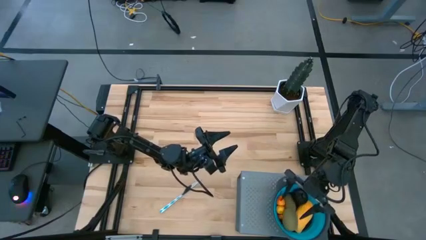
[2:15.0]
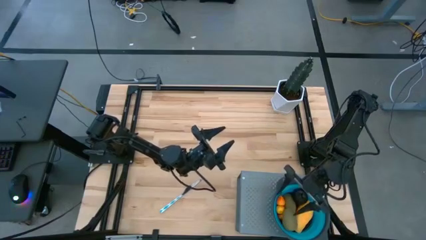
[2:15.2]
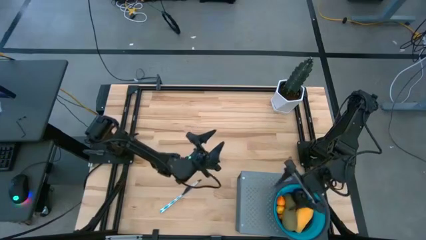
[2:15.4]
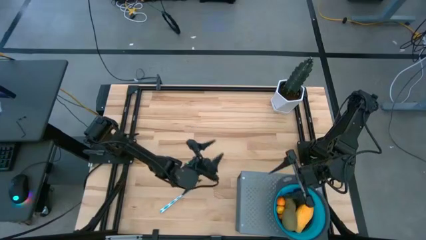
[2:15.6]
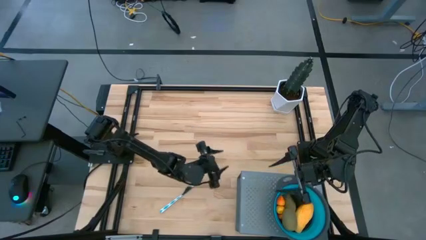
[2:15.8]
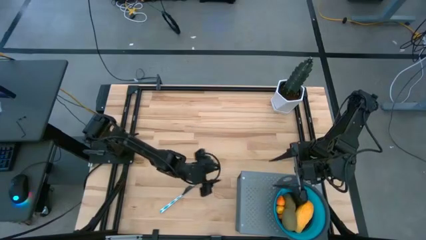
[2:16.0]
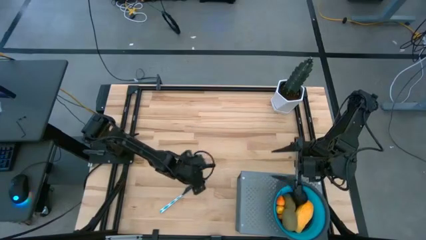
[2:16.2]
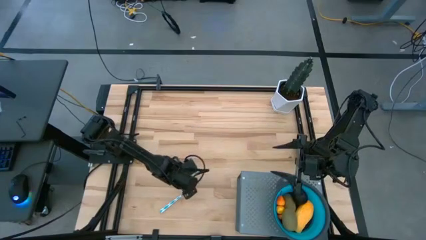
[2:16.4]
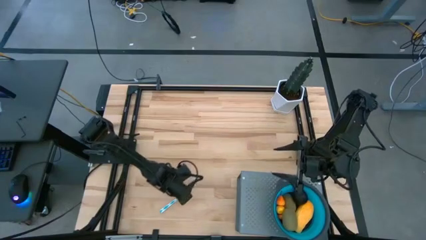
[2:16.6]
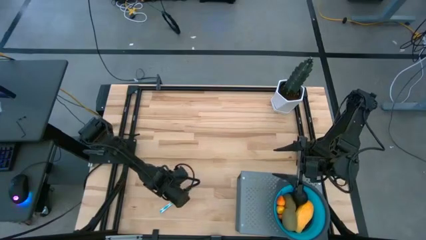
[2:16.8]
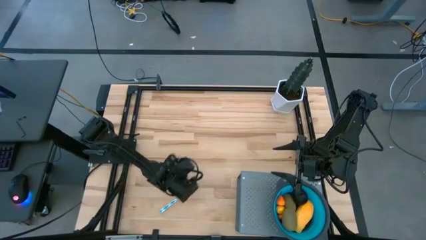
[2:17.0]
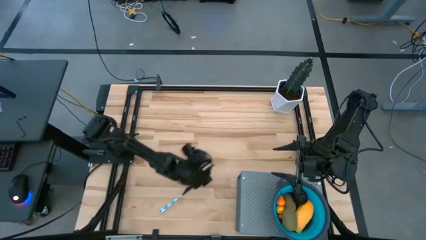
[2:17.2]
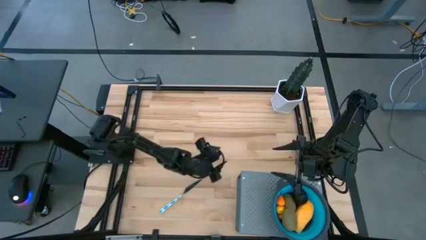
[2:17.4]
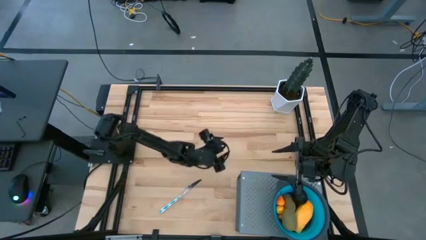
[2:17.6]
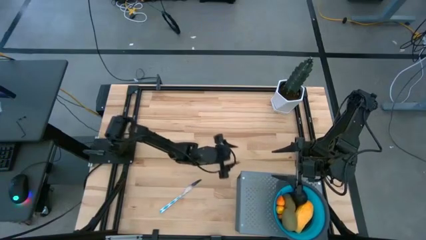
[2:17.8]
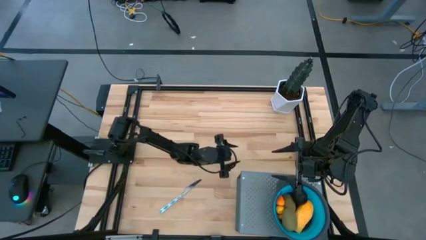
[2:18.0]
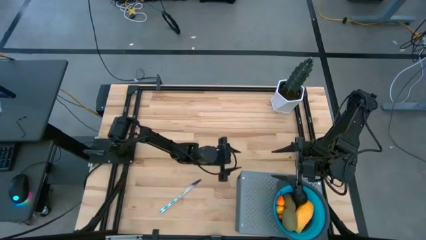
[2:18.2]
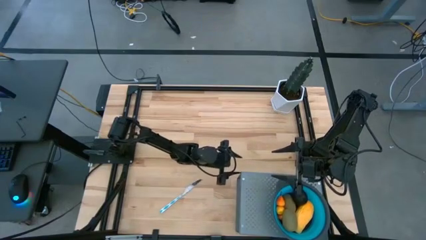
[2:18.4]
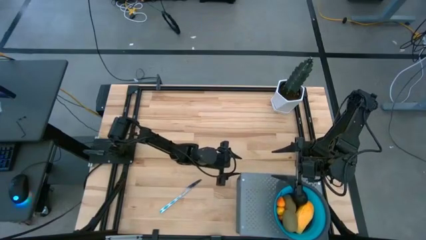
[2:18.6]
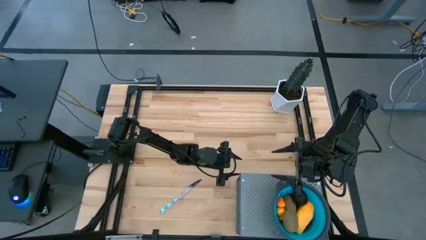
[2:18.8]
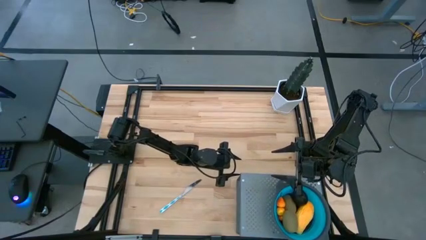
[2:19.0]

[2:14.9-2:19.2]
Task: Pick & Place Fruit
Adjust the shelf on the table

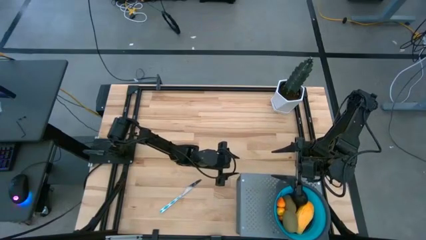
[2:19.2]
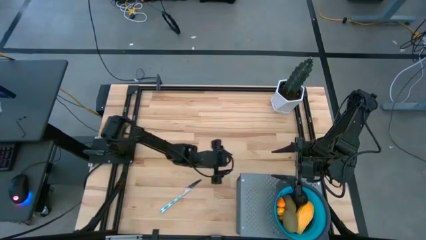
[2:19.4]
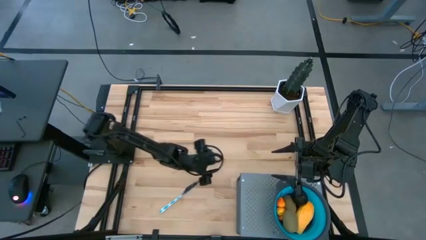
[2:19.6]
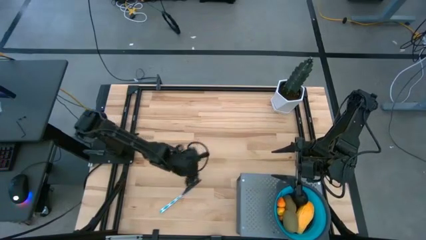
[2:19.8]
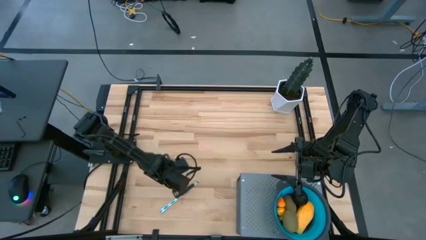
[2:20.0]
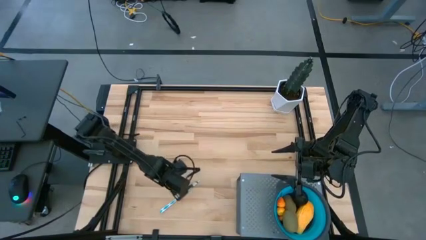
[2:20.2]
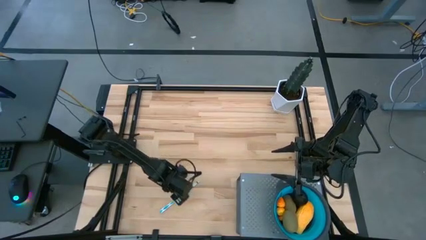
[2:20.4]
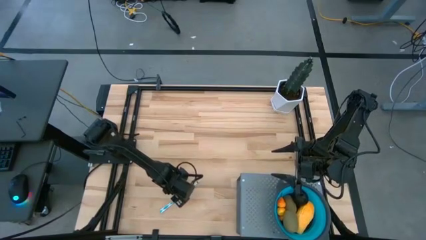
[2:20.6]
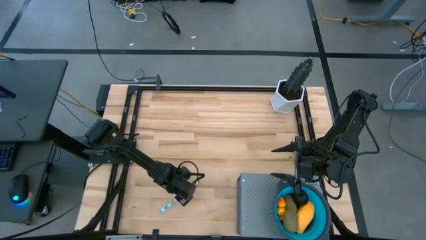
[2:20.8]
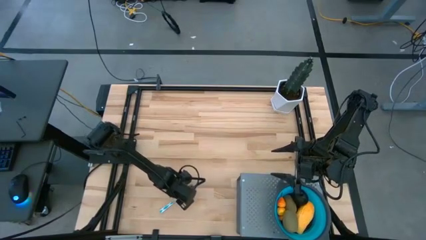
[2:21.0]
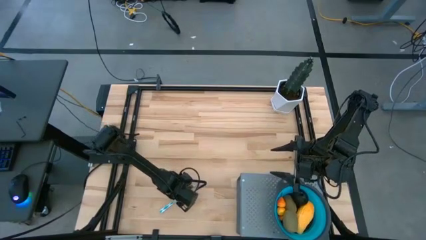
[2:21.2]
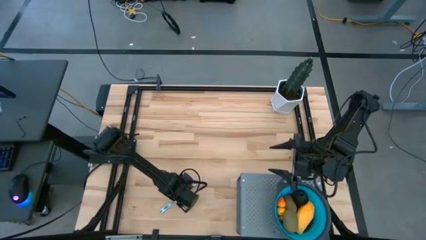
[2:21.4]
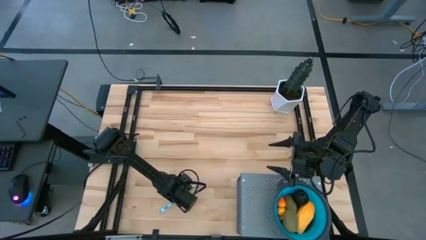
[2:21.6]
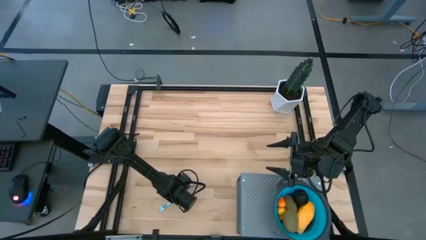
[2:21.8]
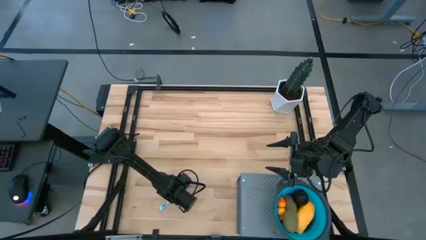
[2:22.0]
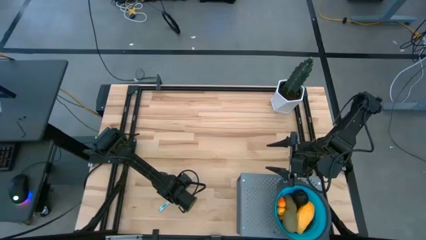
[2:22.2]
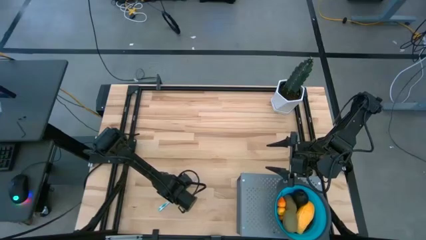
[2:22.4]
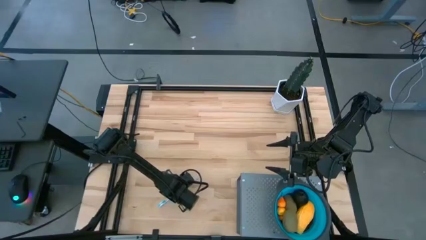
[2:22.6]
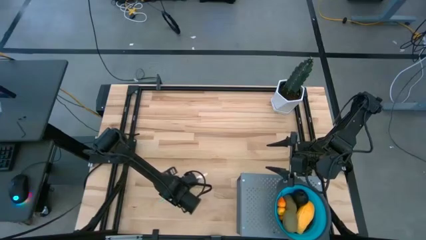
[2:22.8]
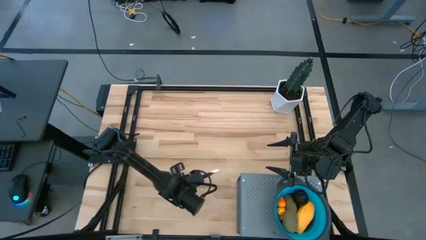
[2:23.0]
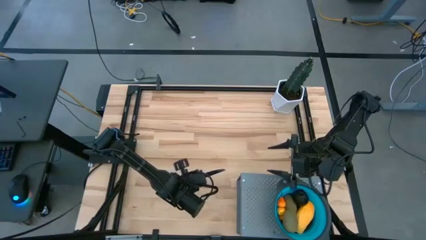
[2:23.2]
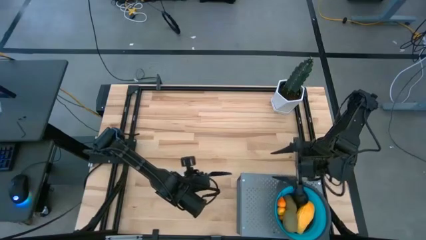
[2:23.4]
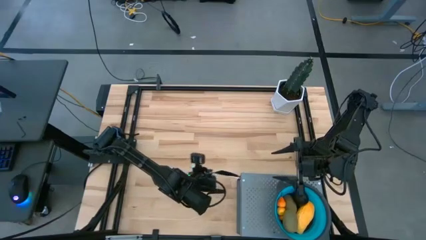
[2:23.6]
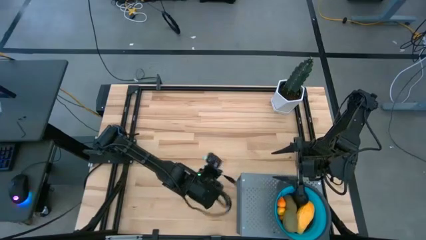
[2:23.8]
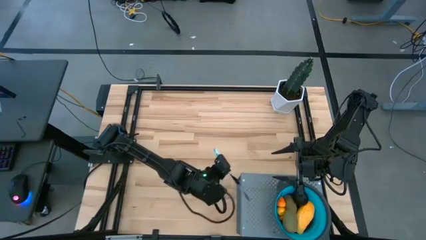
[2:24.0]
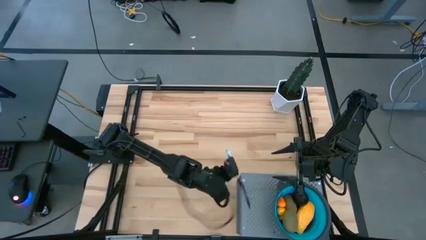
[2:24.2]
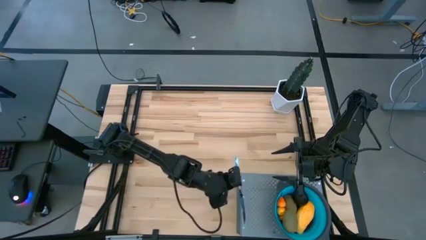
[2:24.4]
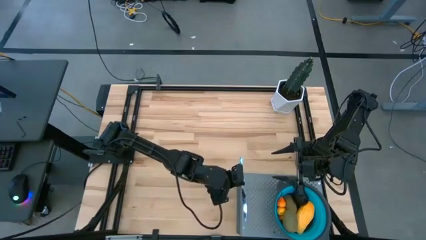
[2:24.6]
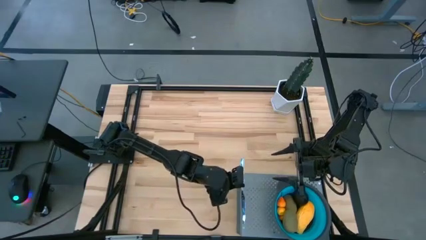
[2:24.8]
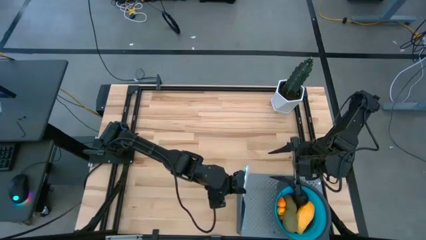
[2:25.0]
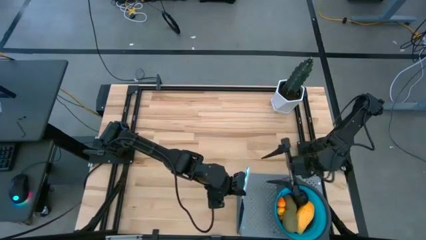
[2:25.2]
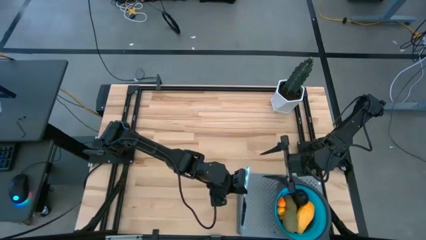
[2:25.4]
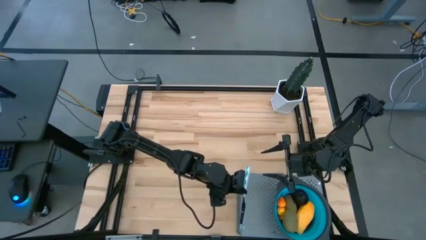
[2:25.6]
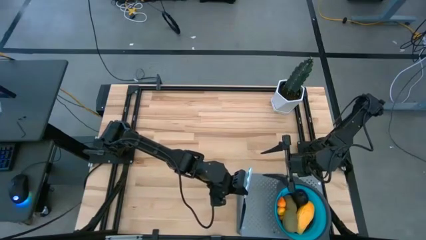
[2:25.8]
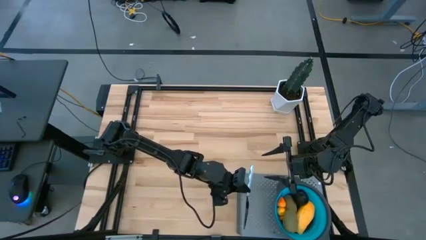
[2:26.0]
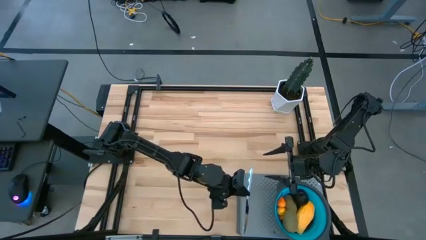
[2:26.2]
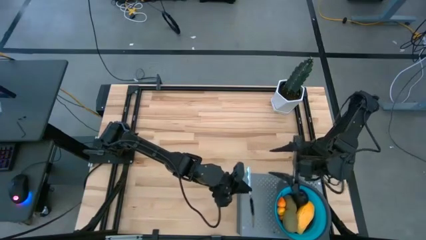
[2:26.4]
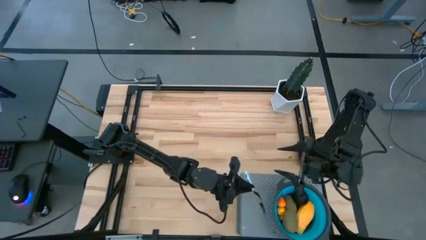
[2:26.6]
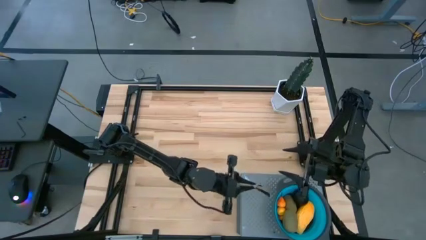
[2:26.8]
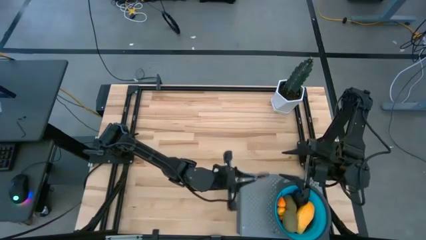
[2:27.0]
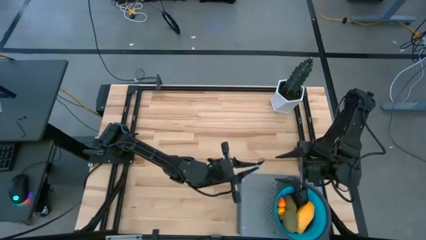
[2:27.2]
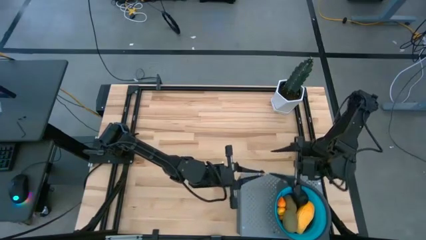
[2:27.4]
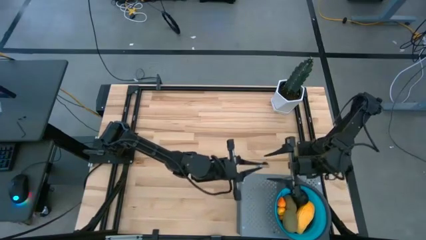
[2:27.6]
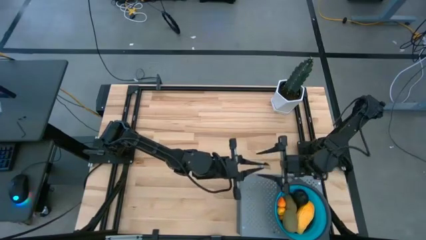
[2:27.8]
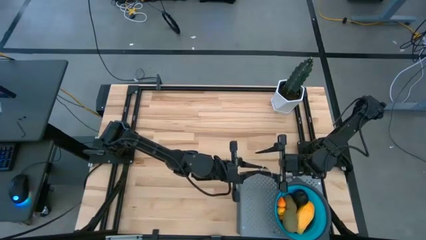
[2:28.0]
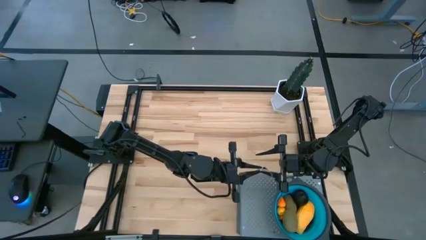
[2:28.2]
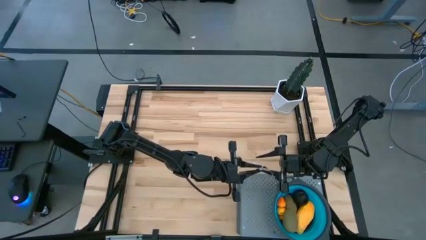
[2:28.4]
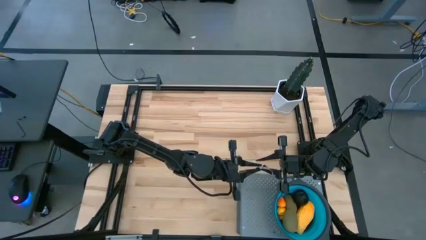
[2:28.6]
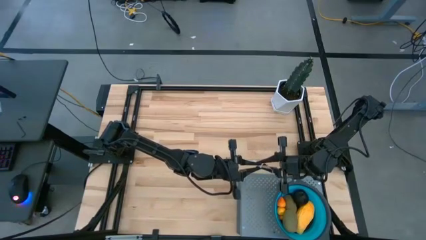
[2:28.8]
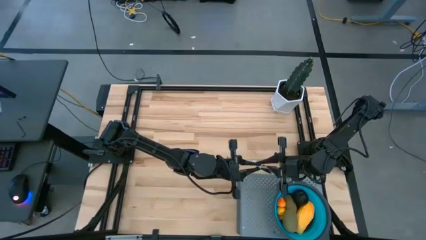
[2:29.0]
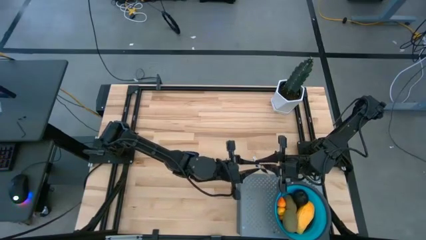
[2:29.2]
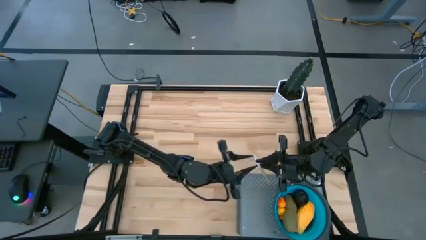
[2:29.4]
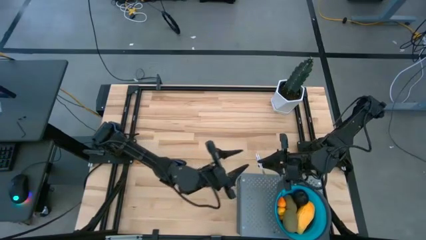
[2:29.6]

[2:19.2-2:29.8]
Put the white patterned table knife on the shelf

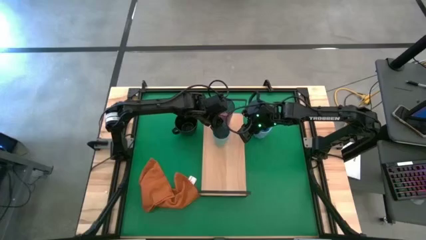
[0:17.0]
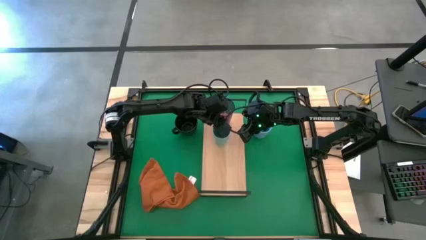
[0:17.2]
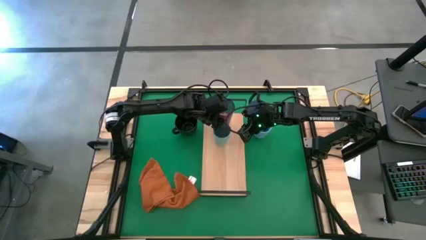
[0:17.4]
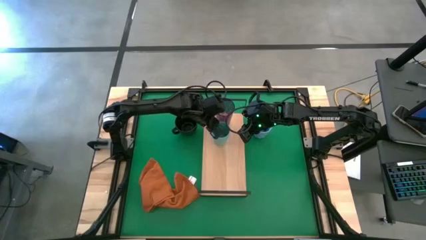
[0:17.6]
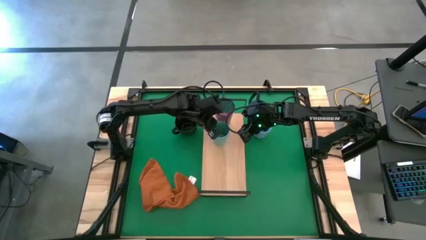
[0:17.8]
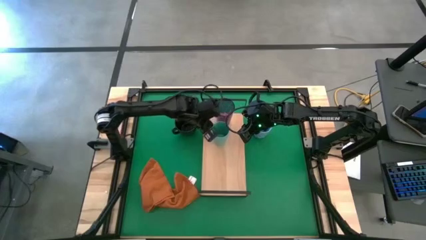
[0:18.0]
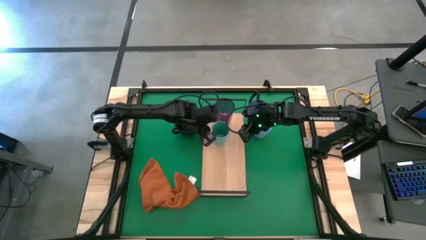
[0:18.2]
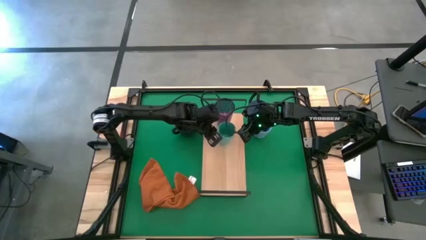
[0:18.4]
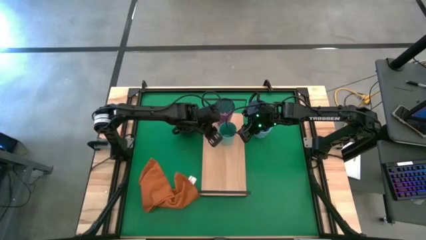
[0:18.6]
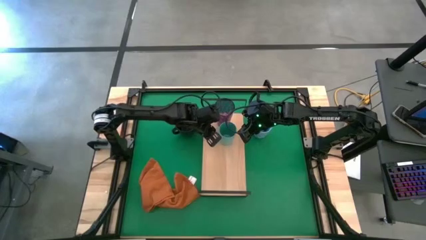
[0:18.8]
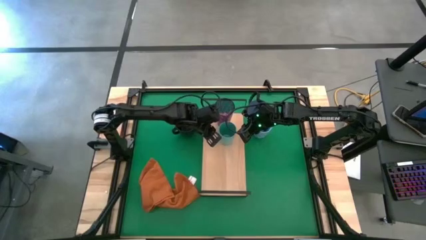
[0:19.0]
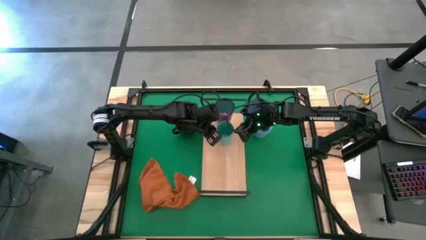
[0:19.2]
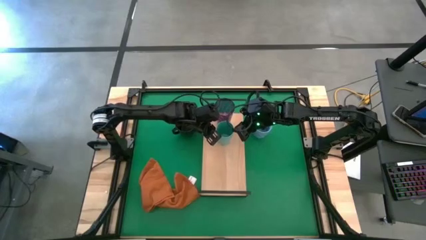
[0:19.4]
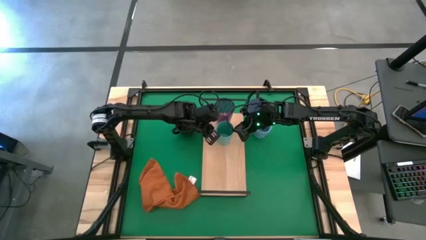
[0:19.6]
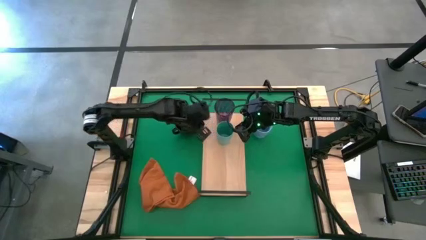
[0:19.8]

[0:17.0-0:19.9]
Task: Stack small to large cups/mugs on shelf
Adjust the green cup on the shelf
